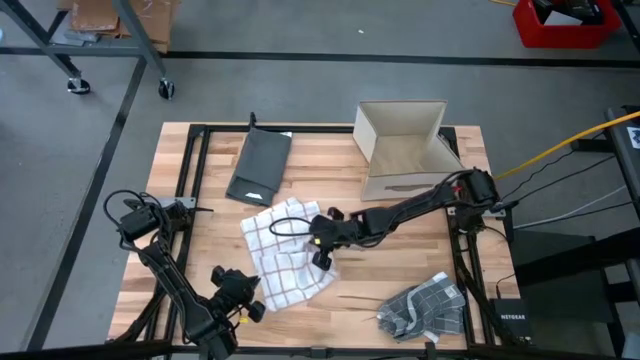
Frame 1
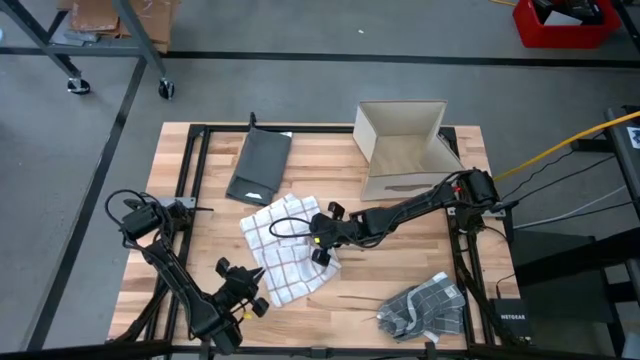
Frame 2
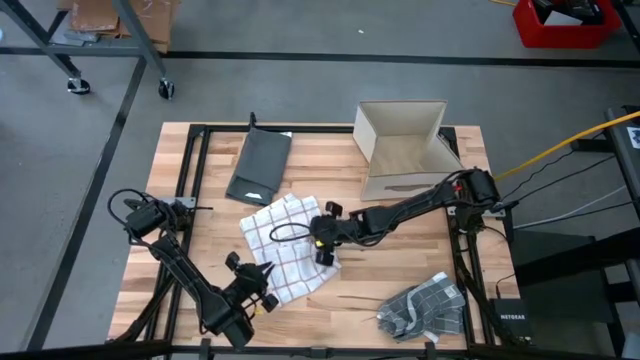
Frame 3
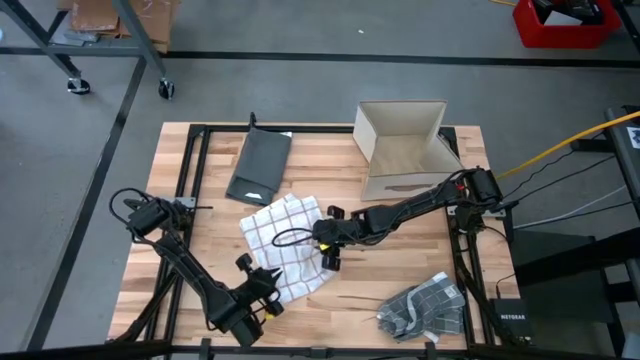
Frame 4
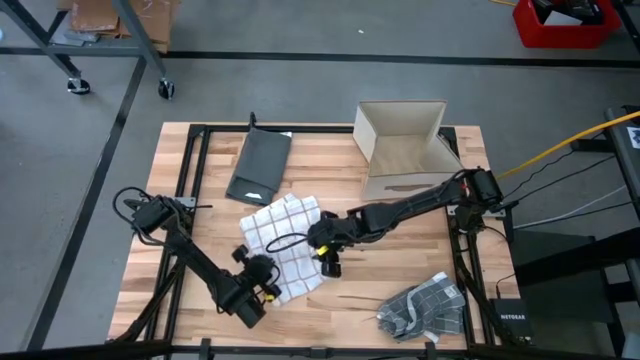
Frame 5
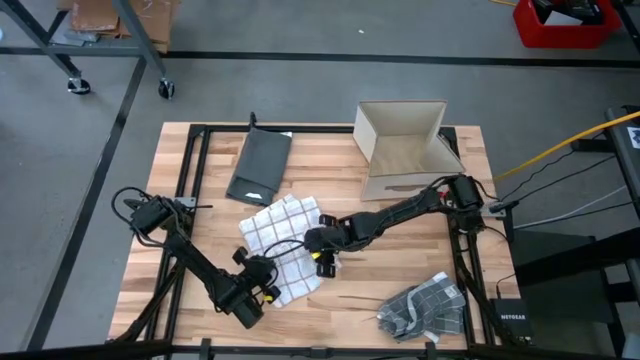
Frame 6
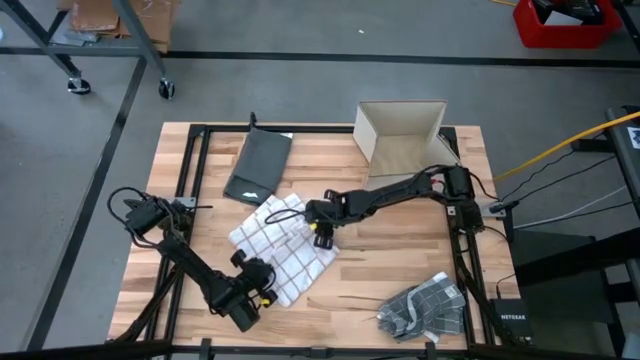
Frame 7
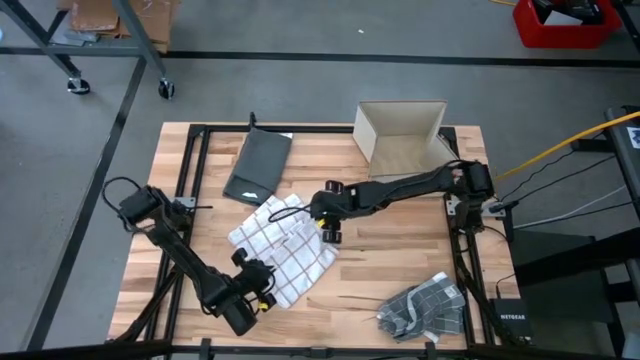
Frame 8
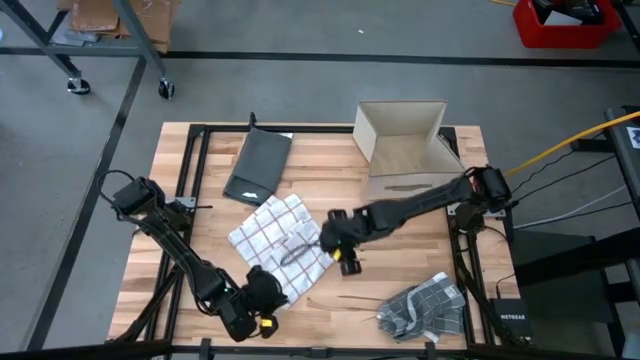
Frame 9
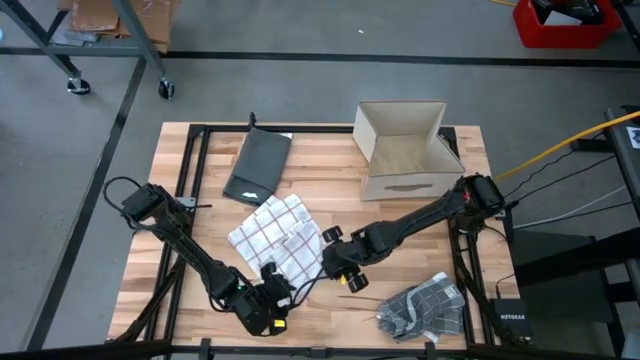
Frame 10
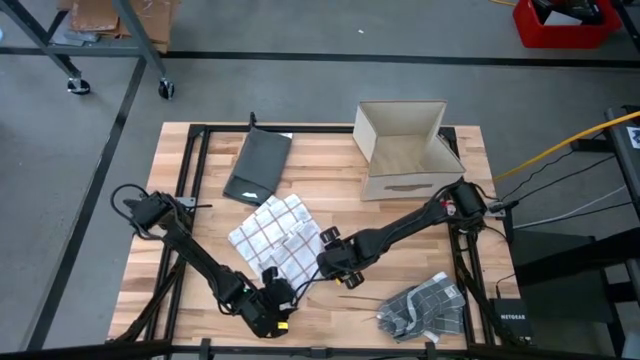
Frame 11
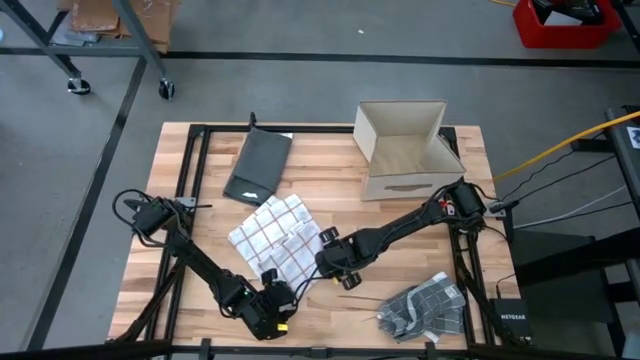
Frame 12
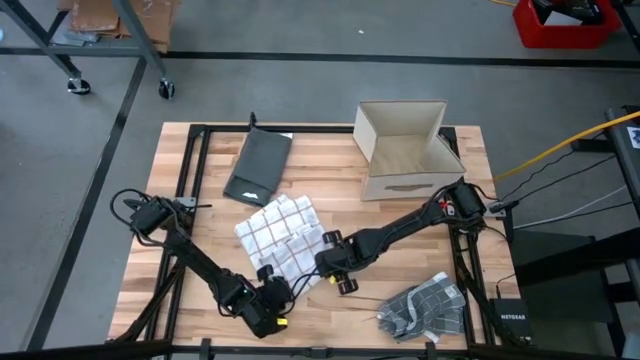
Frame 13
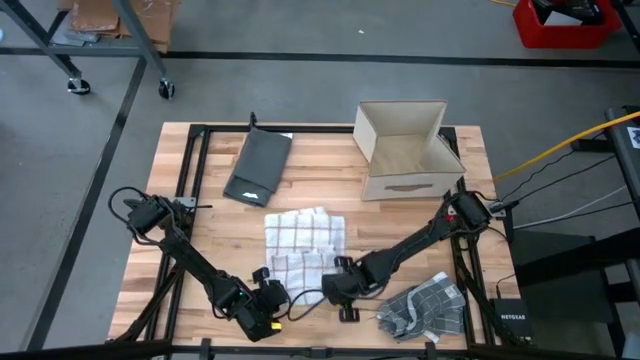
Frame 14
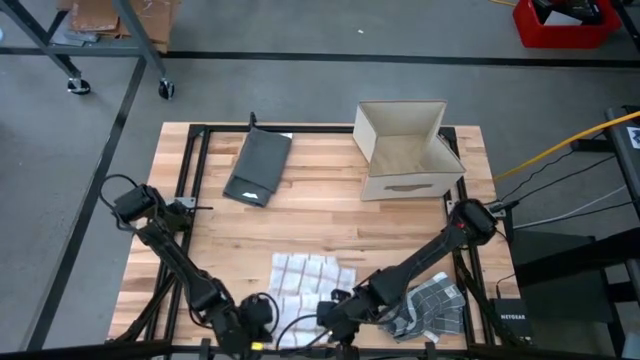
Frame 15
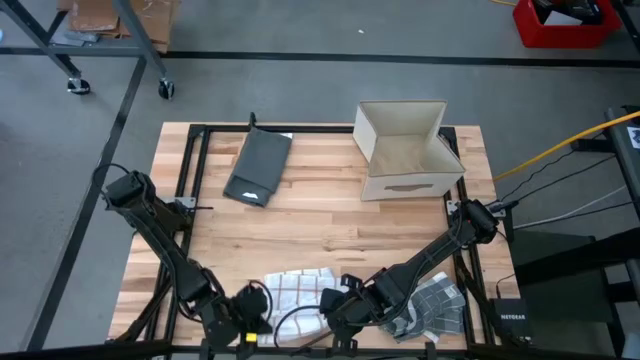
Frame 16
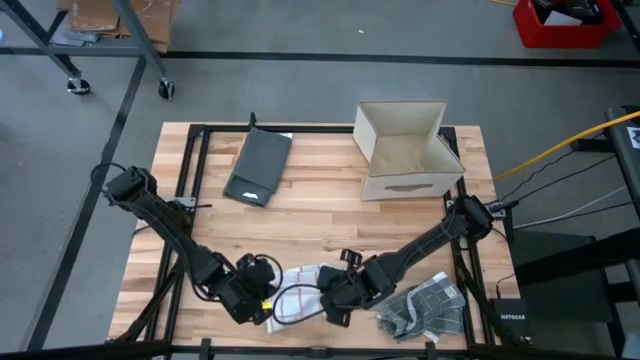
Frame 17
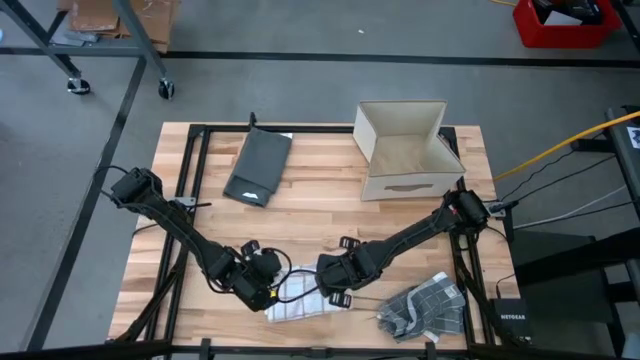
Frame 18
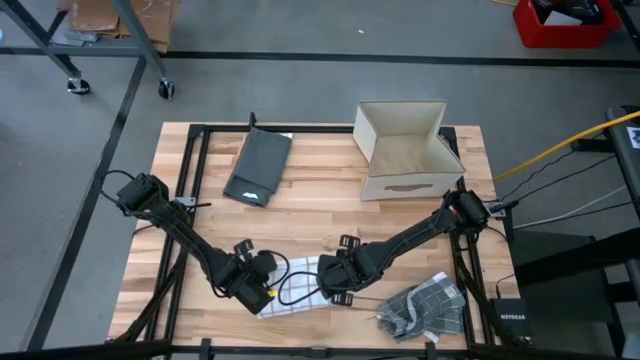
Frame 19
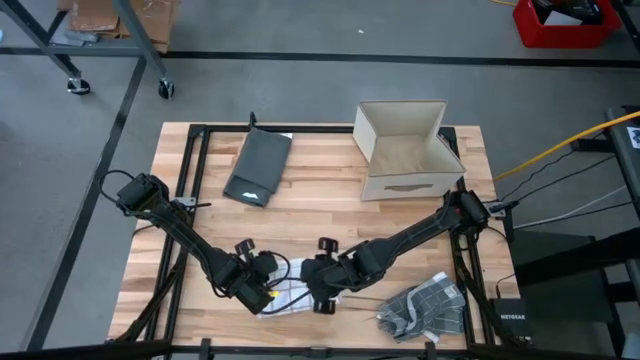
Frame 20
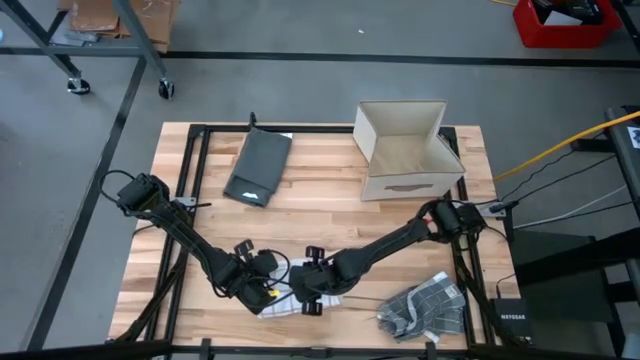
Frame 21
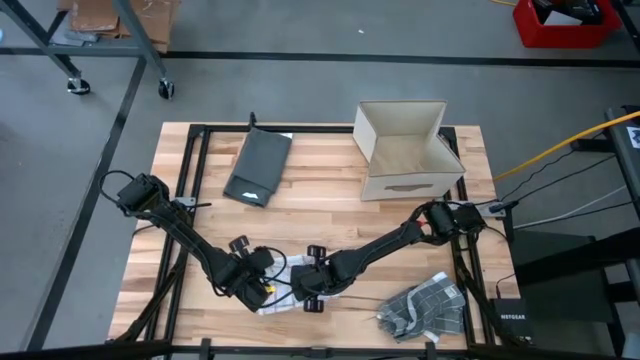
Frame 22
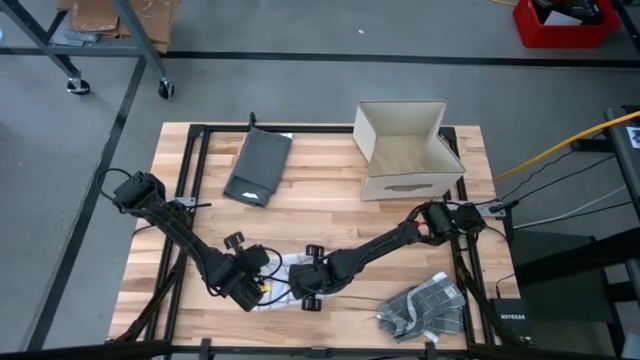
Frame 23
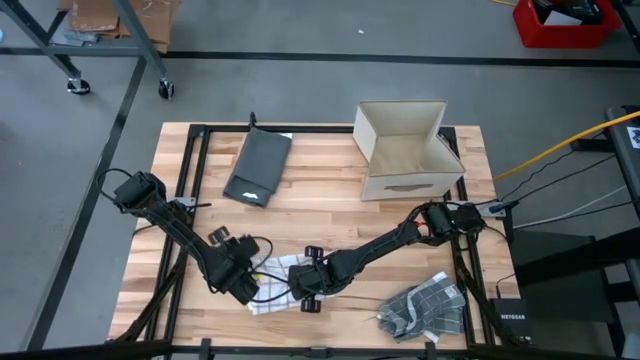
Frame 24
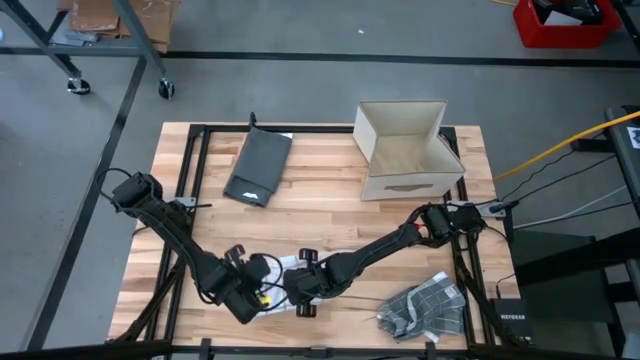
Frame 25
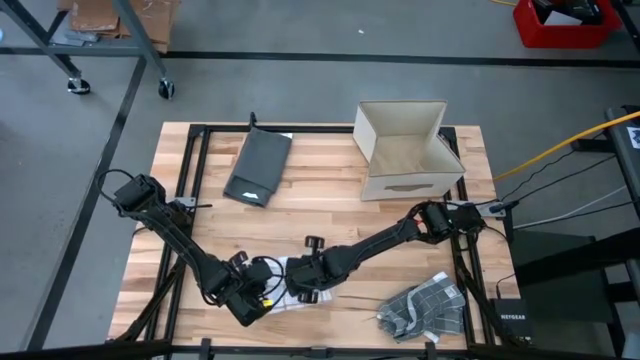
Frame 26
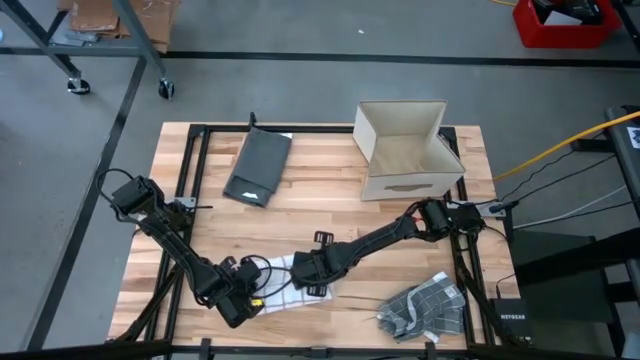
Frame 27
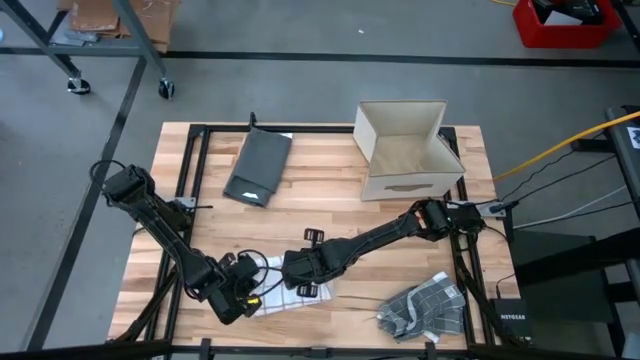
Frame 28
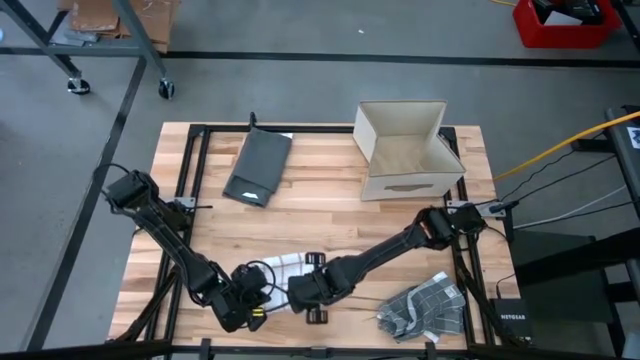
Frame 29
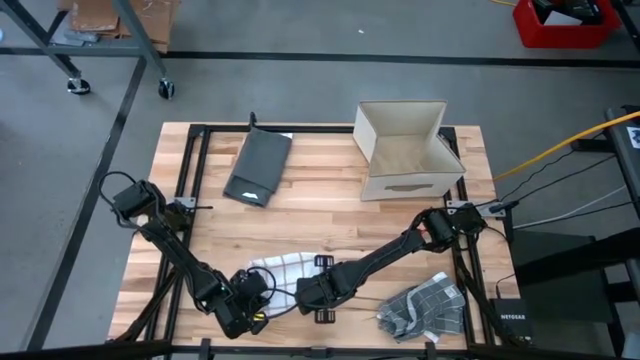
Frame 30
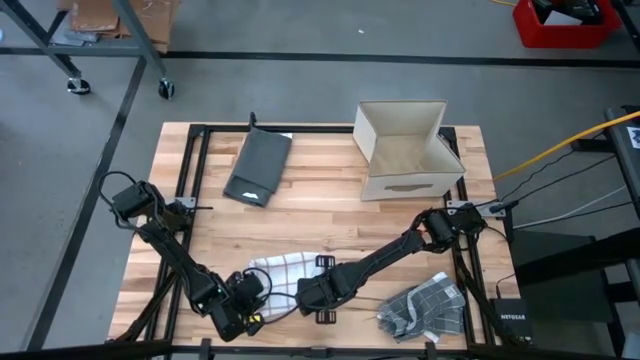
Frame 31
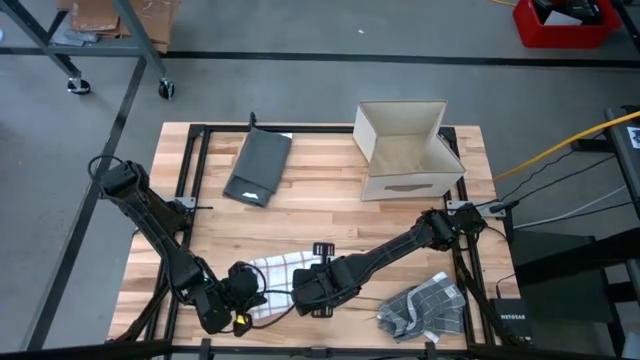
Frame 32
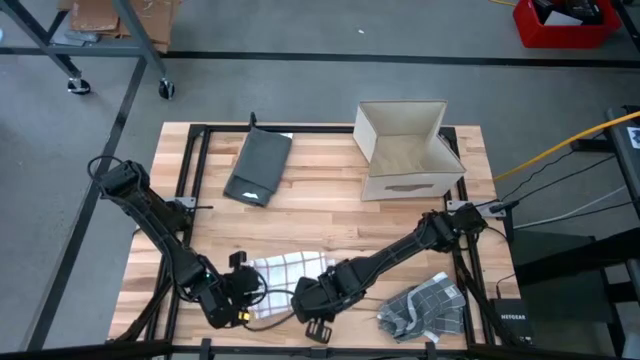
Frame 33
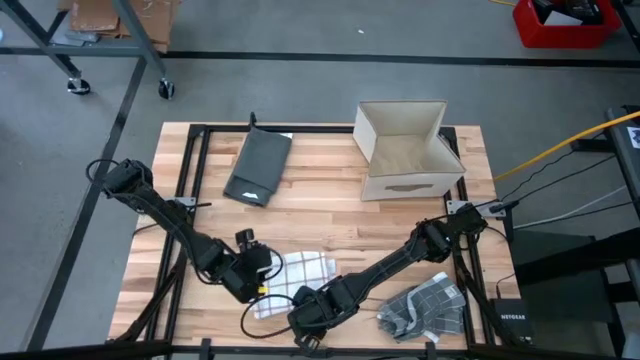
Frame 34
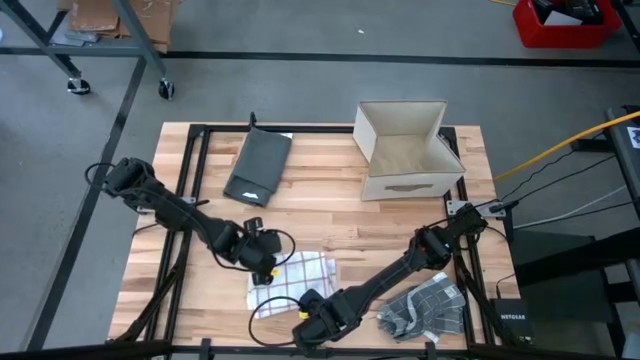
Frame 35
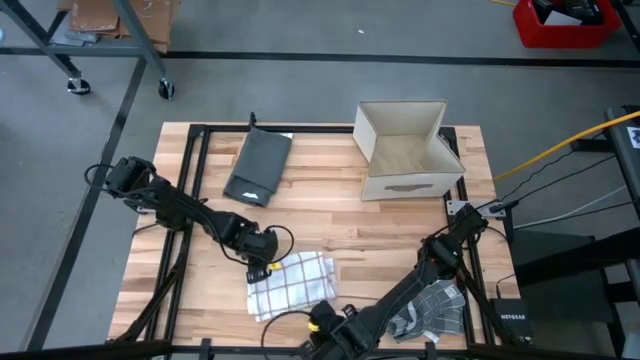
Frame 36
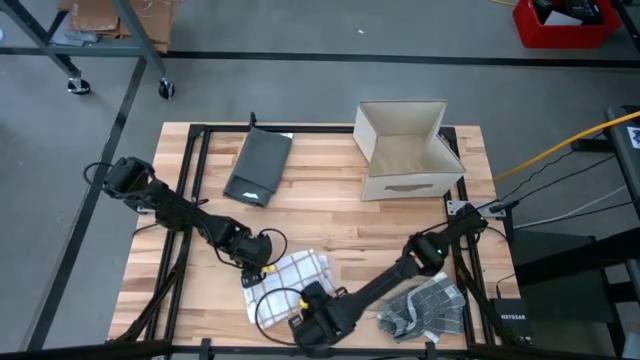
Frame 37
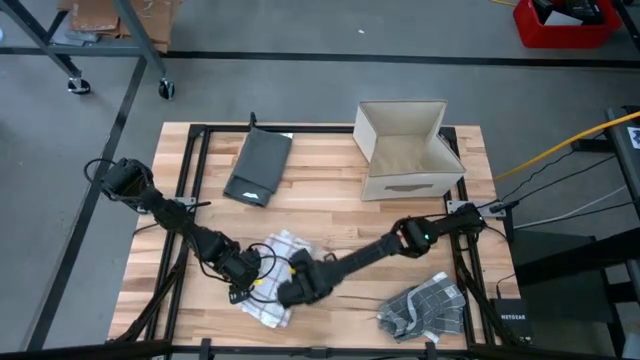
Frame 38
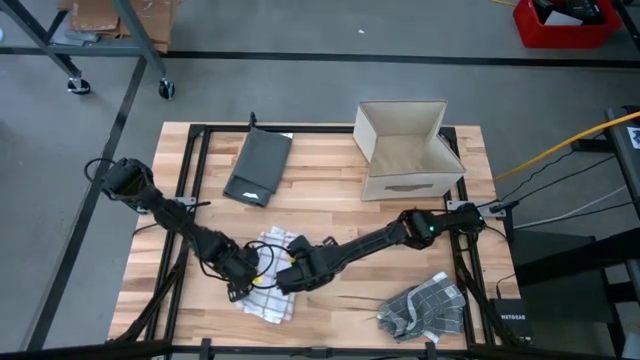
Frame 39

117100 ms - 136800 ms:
Task: Fold towel
Fold the white kitchen towel

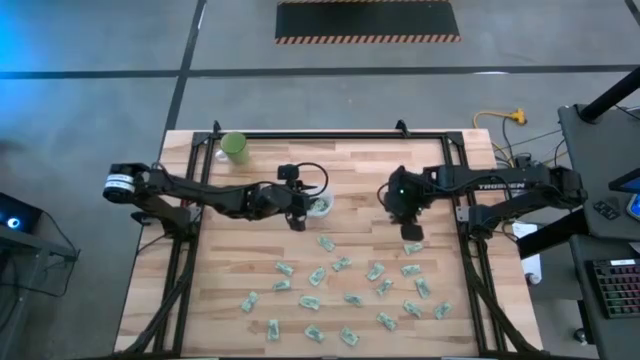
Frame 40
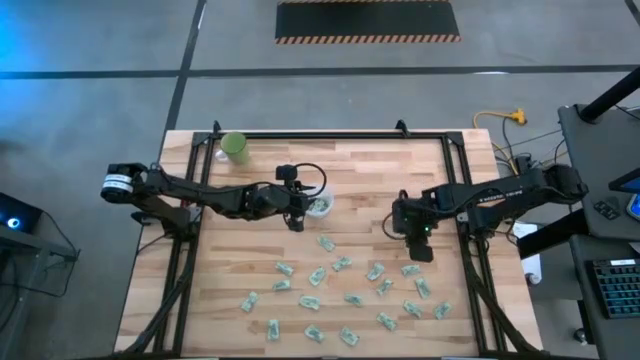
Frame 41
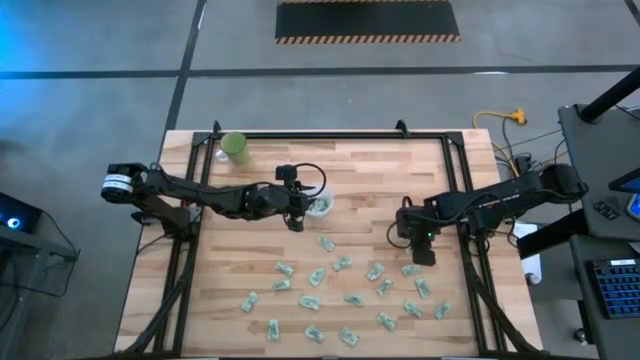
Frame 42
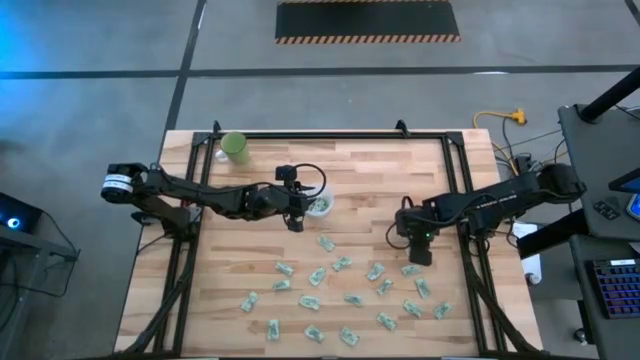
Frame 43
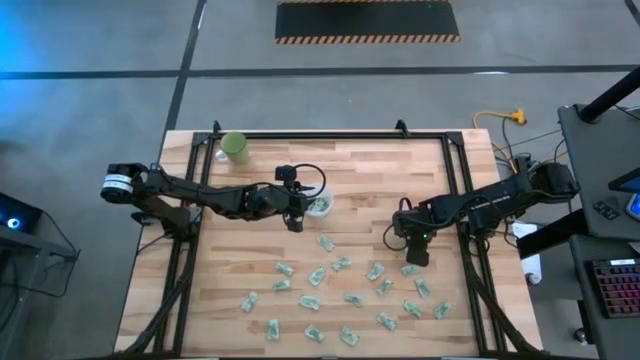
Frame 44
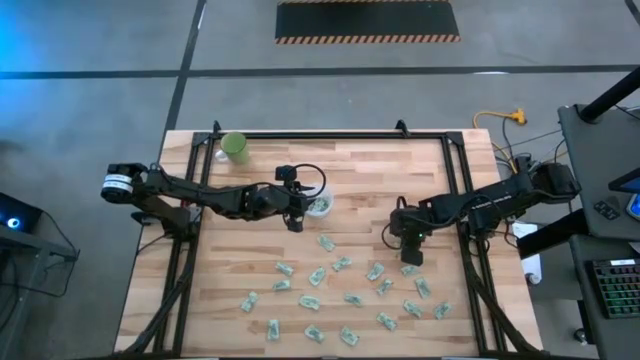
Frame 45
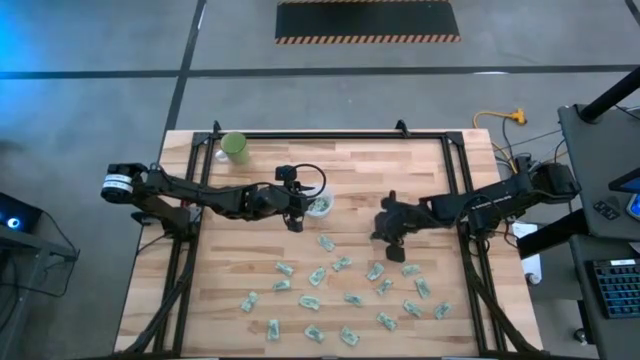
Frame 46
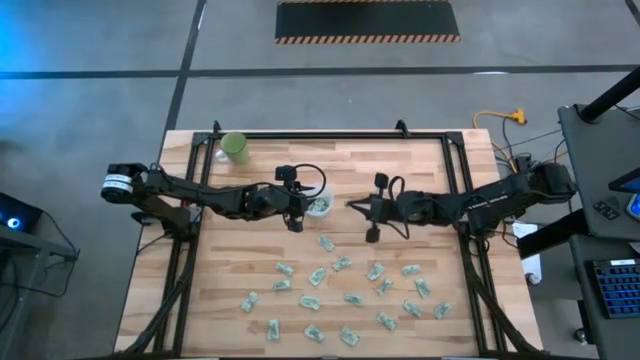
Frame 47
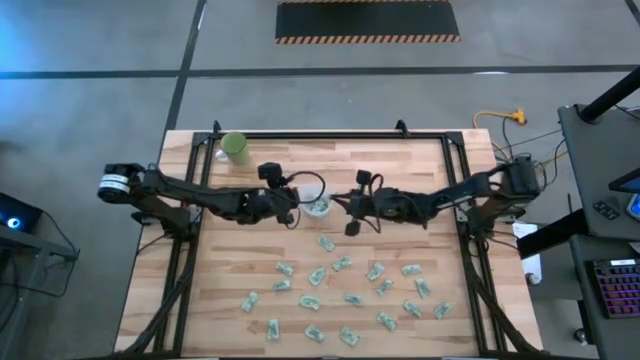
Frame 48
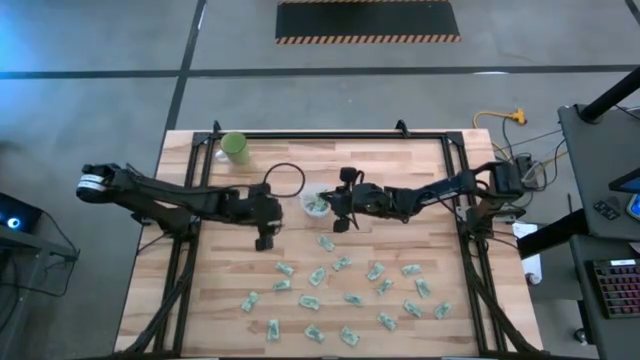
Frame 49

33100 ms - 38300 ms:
Task: Pick and place Stevia / Truvia into bins
Put the green stevia packet into the transparent container
